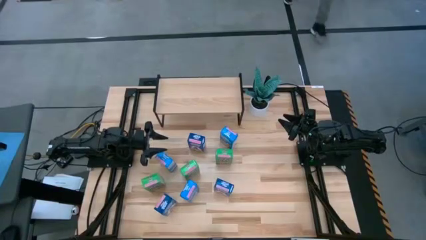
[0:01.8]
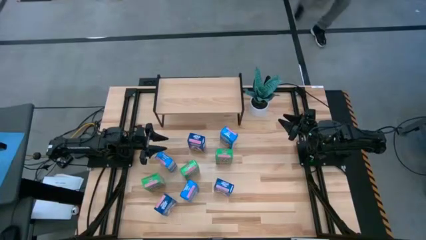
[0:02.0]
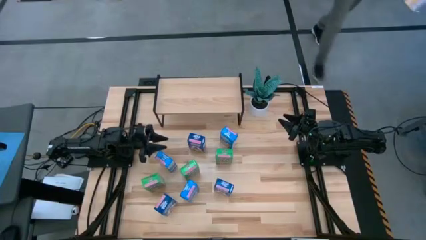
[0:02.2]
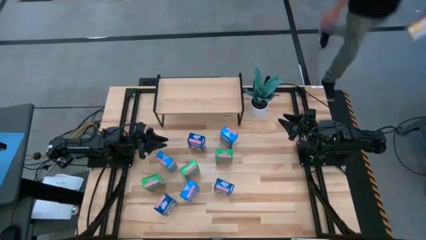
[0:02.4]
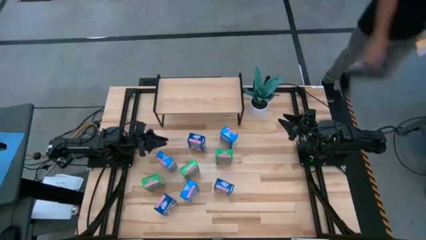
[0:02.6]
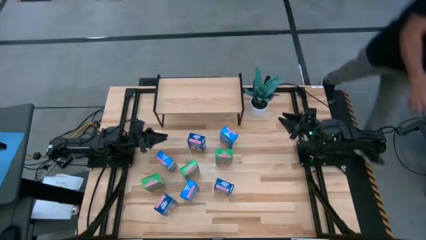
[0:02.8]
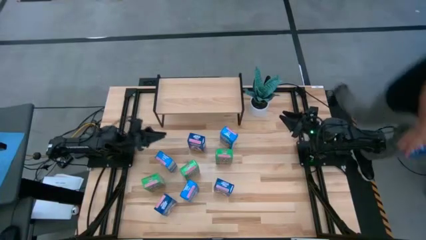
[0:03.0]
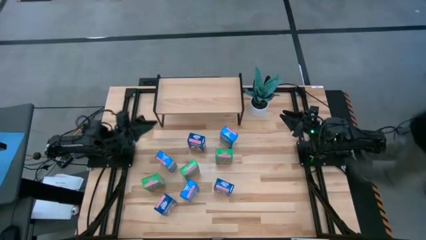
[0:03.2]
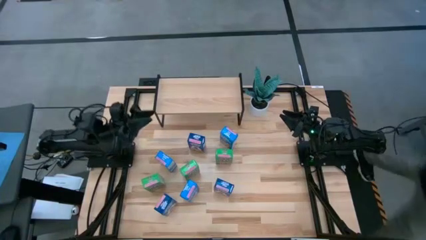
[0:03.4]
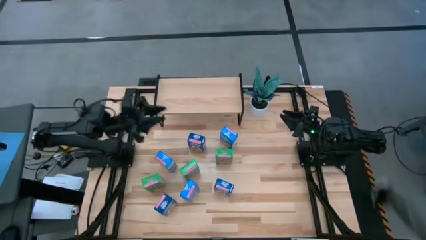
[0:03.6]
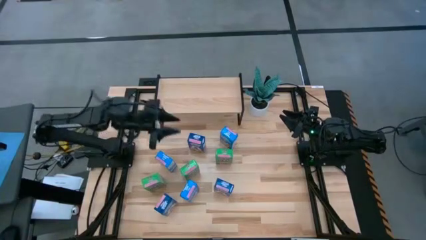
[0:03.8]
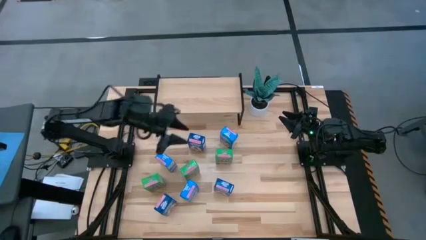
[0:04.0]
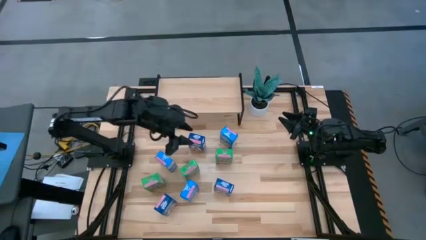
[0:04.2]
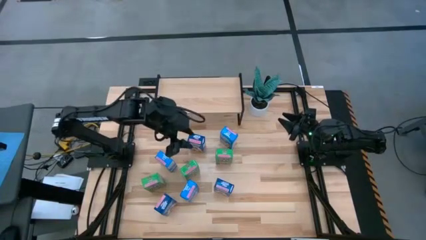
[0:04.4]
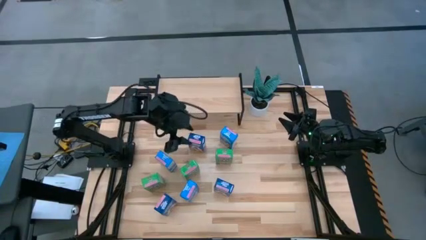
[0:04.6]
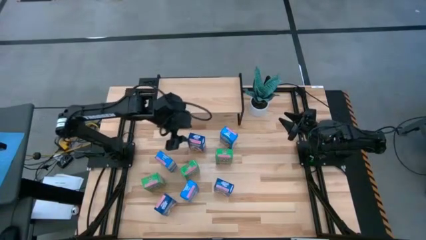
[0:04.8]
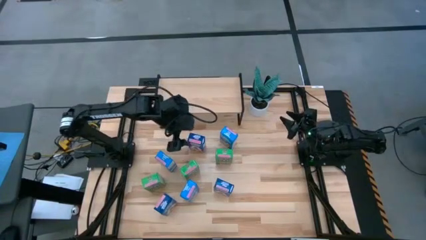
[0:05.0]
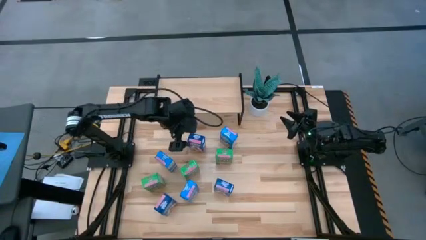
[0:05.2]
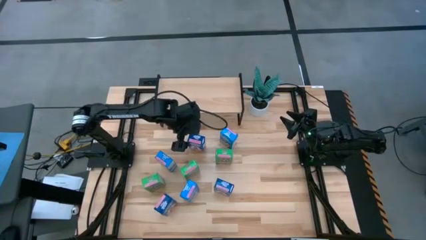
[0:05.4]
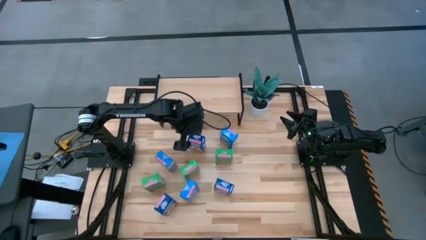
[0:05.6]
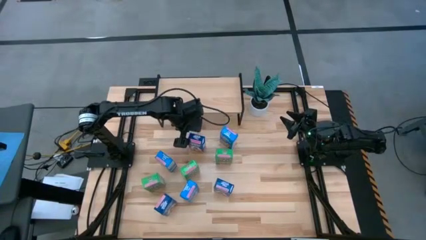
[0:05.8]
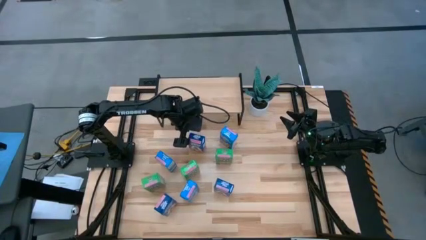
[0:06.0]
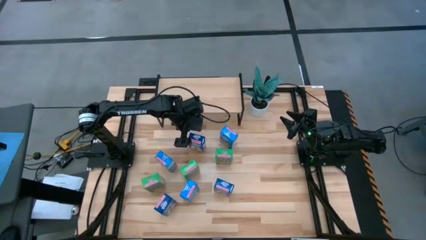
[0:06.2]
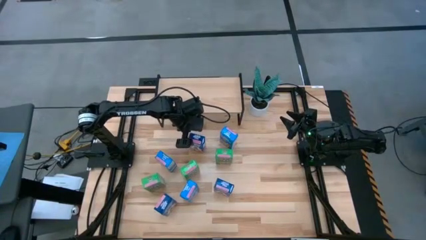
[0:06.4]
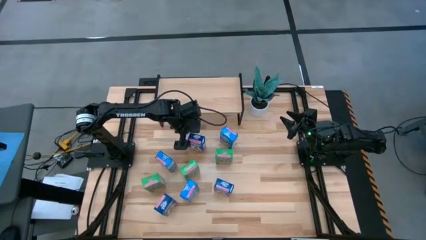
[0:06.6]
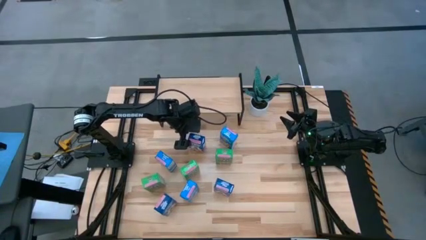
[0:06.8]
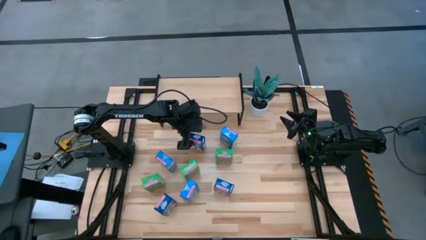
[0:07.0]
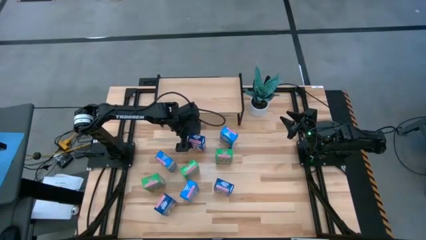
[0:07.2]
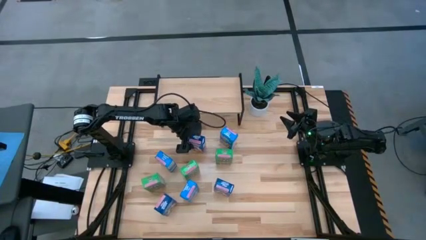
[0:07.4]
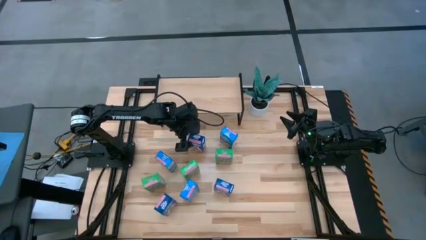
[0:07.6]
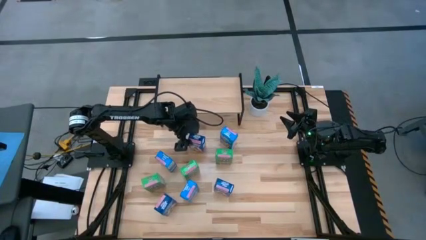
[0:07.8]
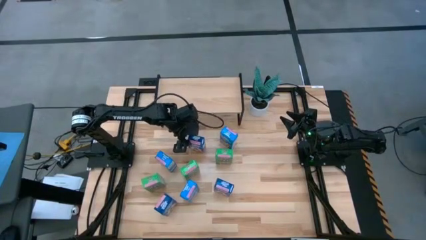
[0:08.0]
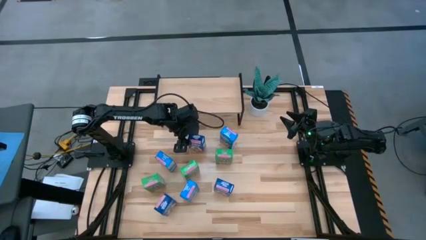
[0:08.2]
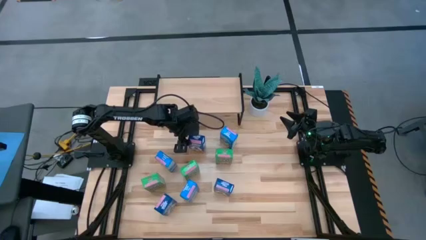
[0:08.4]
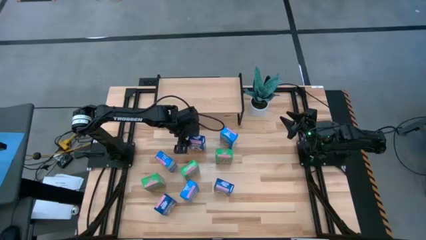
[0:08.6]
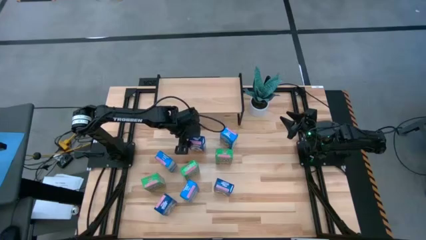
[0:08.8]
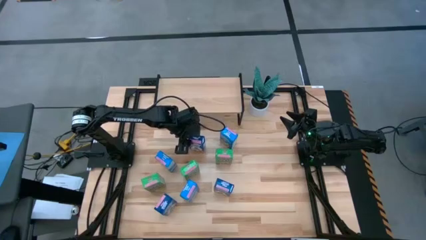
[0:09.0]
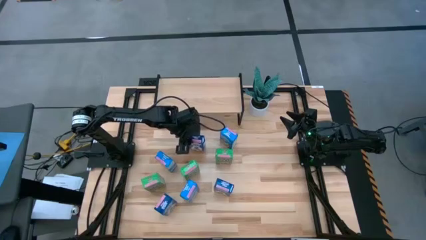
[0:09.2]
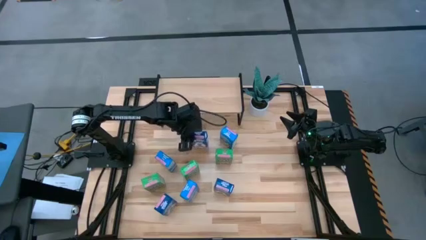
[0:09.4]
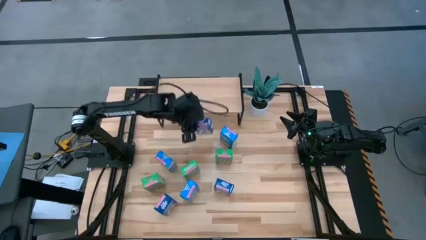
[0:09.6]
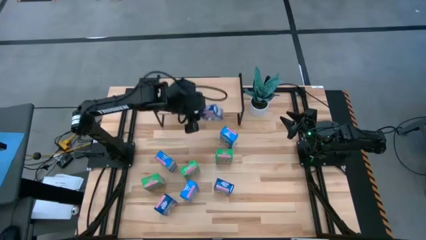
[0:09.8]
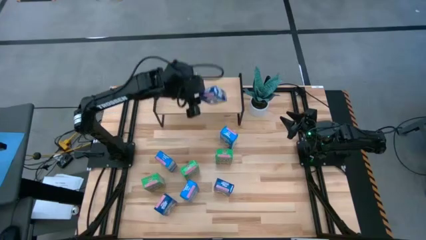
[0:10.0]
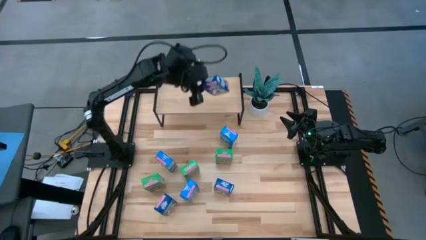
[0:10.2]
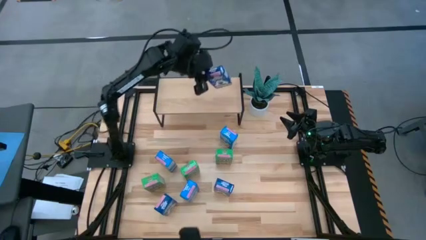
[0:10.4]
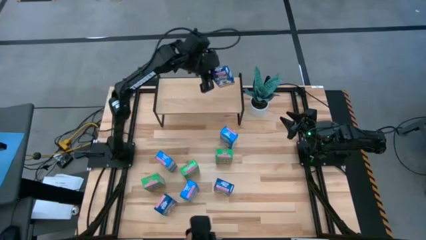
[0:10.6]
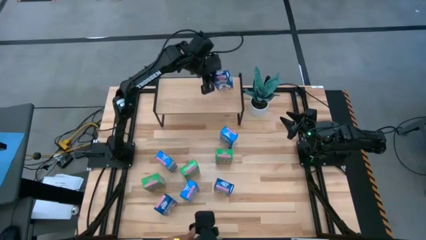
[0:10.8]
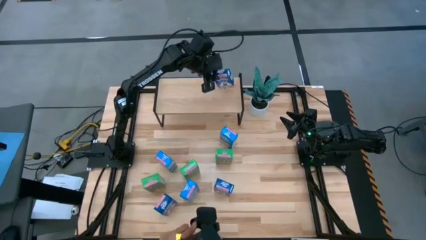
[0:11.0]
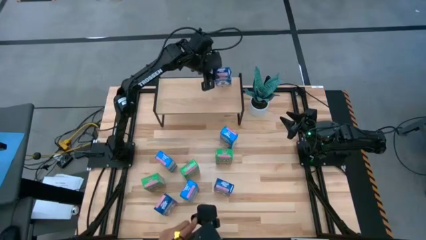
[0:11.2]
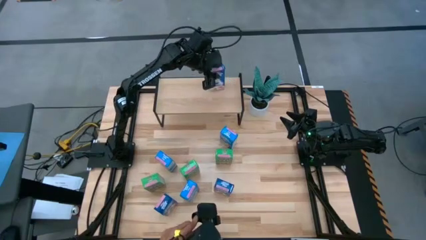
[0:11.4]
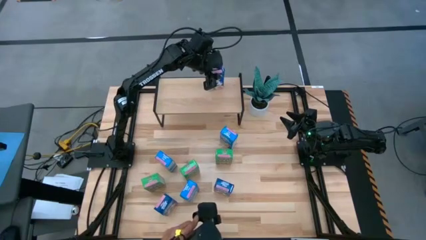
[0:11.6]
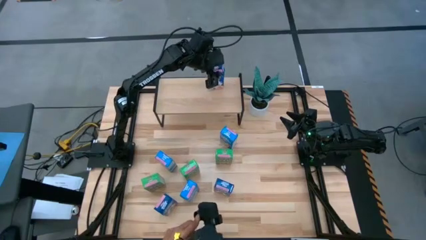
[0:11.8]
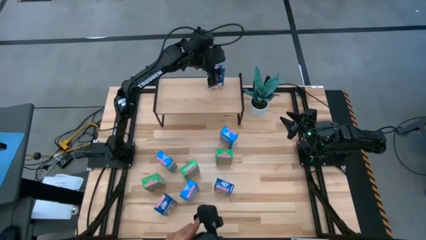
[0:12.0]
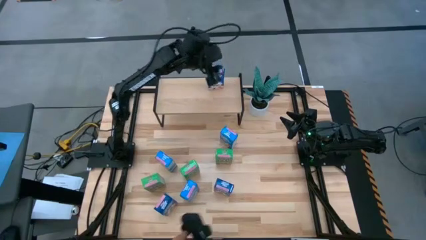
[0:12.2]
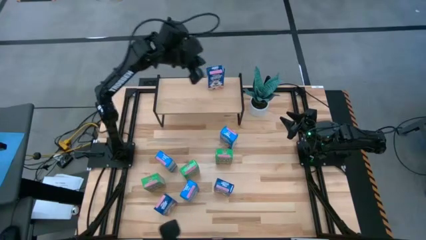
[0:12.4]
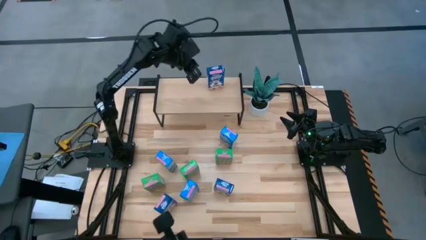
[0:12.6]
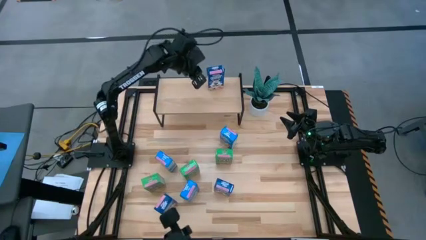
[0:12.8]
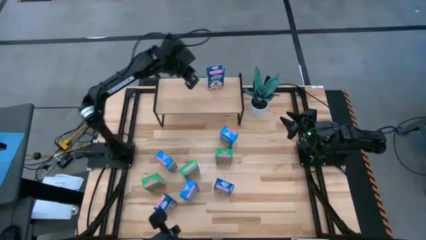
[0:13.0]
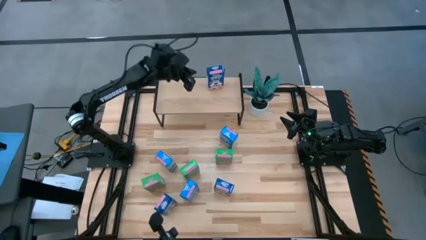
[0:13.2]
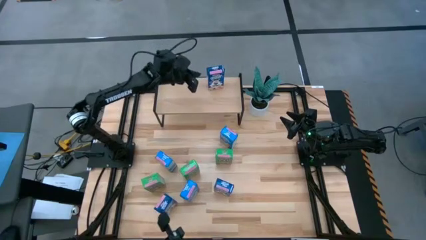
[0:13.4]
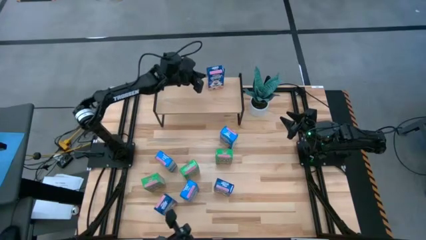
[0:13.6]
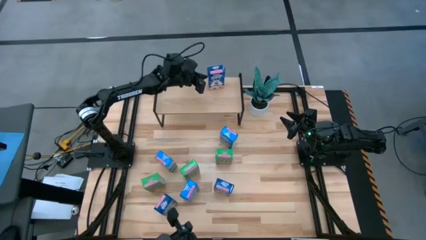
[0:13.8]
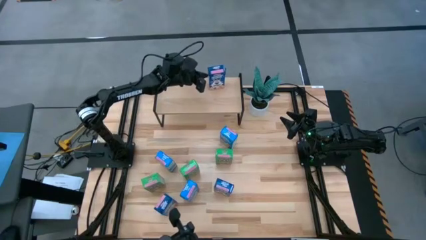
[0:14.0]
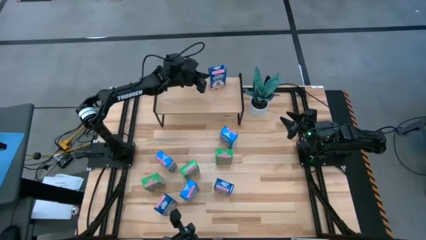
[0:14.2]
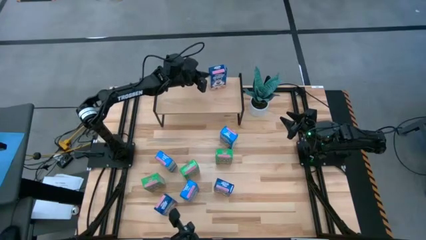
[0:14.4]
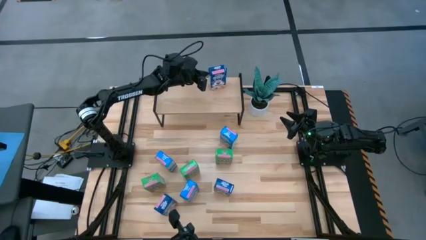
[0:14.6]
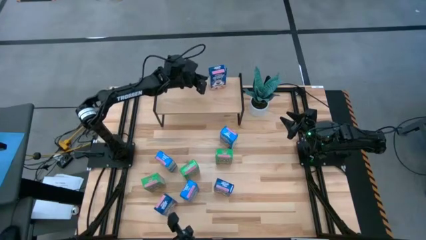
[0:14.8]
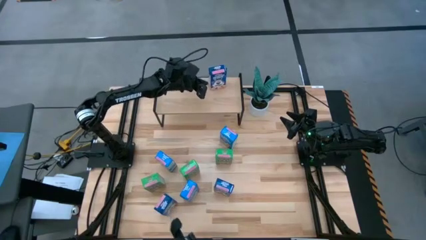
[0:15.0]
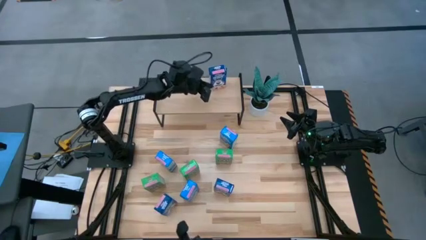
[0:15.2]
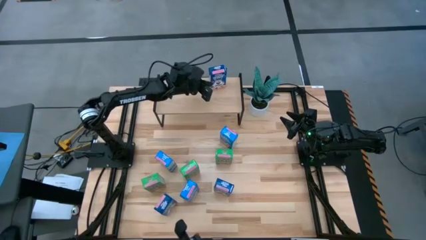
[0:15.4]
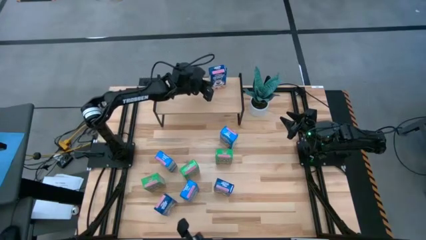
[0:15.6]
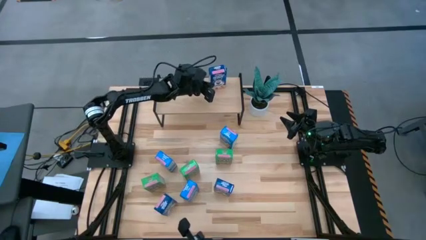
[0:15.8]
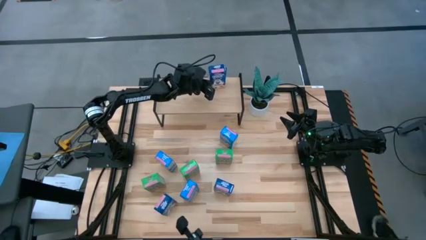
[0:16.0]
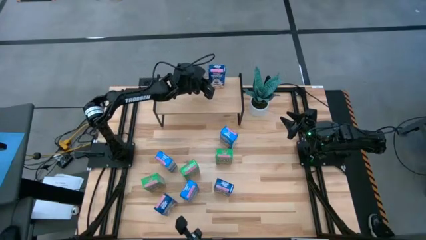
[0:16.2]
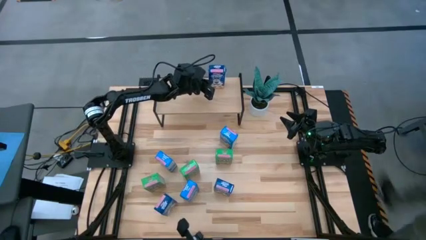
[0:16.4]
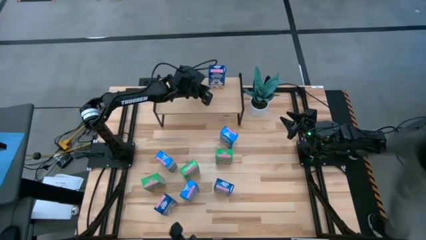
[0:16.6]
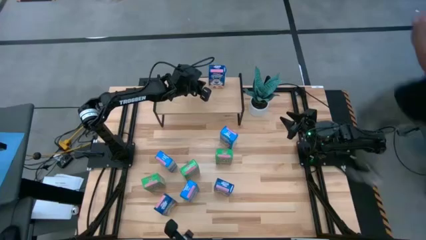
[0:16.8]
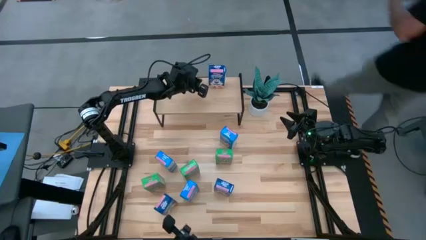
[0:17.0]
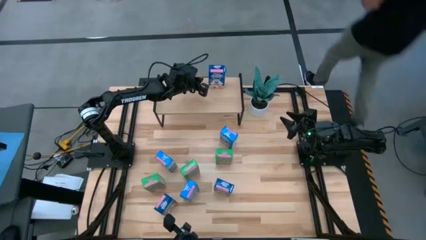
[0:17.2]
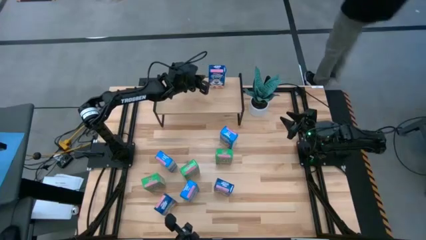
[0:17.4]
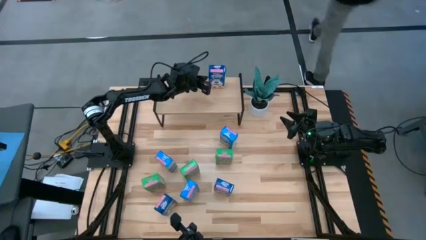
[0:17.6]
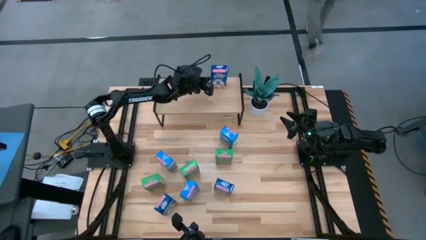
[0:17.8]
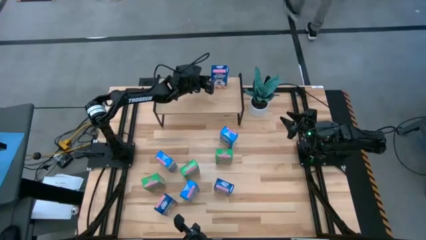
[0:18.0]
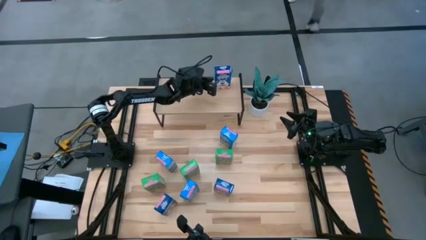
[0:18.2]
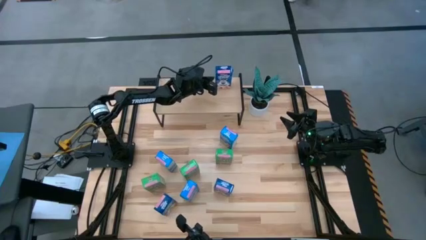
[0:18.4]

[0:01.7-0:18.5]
Task: Stack cereal on shelf
Put the top blue cereal box on the shelf
